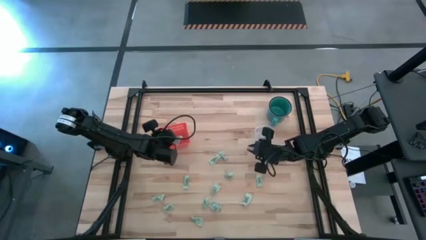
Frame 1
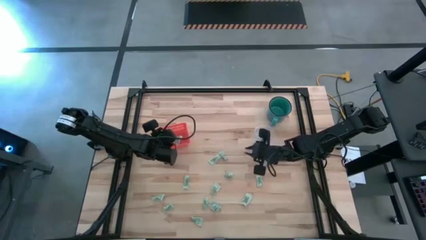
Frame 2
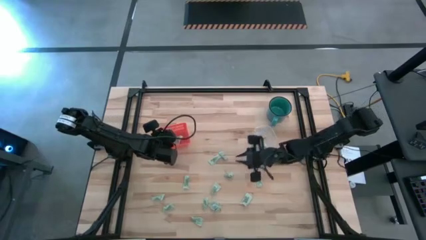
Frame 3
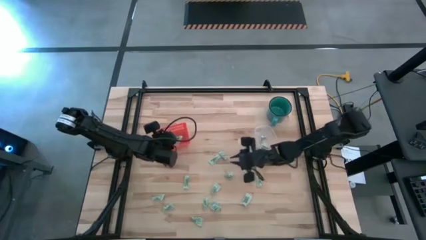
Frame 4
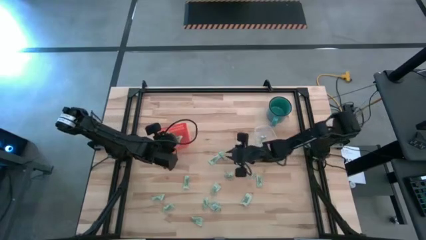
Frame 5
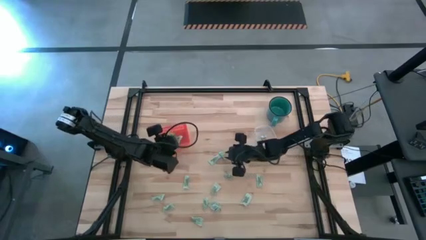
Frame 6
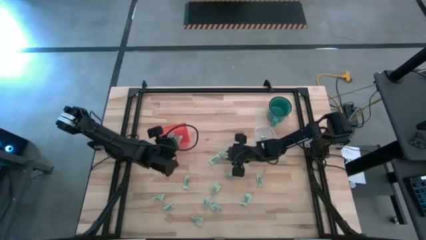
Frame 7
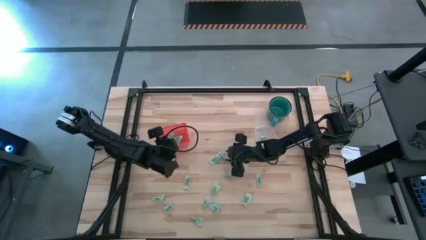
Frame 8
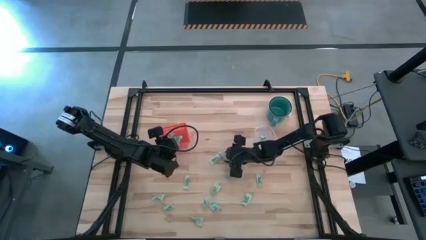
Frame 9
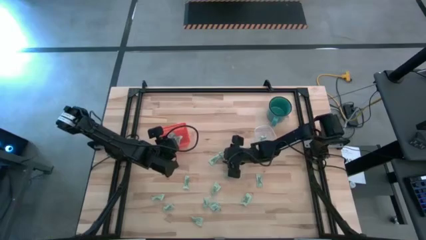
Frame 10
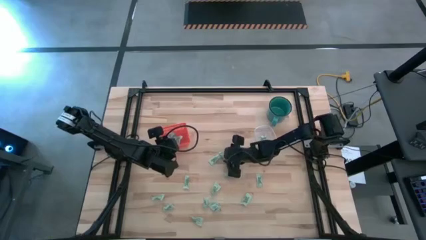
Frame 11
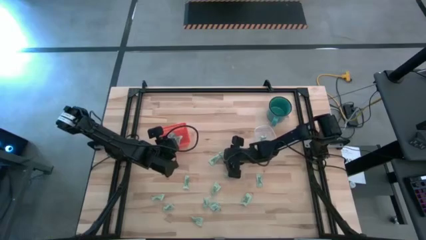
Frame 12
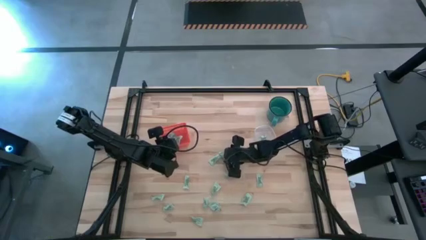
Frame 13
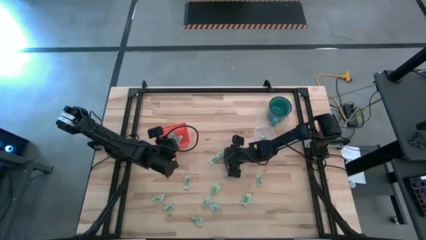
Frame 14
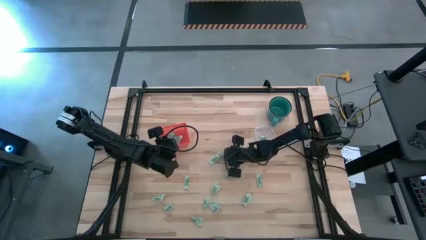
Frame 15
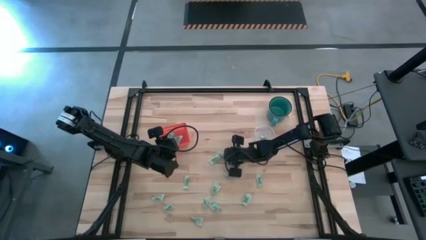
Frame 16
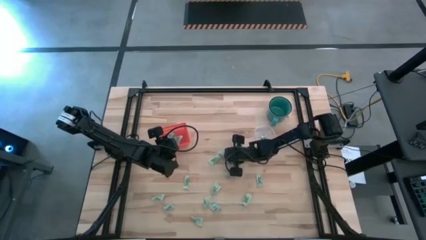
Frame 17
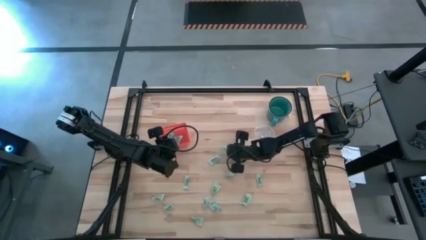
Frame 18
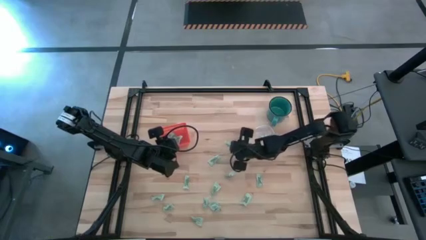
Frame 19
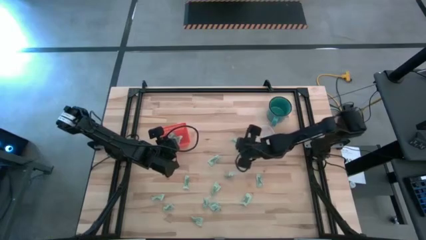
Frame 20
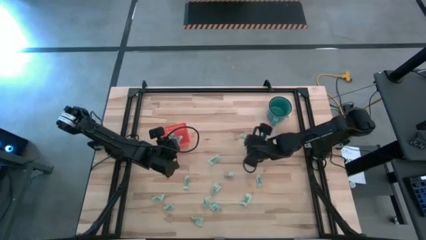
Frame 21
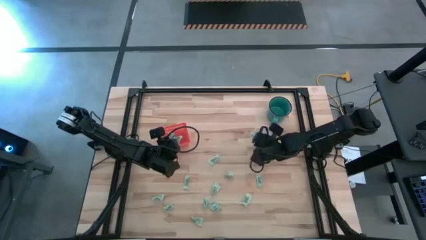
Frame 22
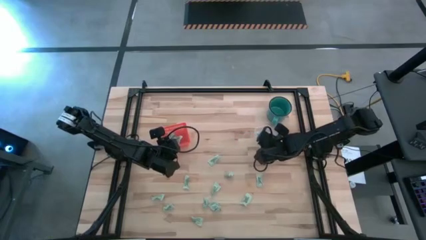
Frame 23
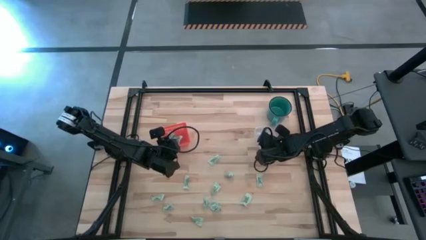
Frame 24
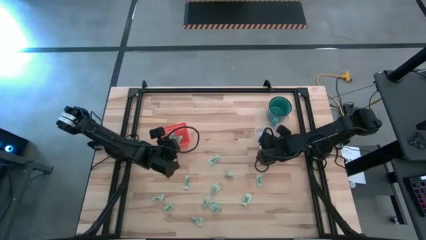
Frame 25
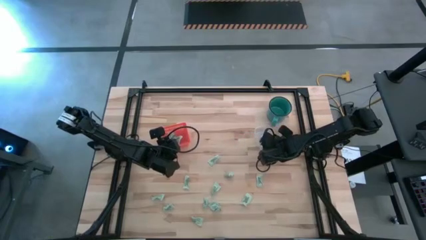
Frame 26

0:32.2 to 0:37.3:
Task: Pick and place items into bin
Put the stevia packet into the transparent container

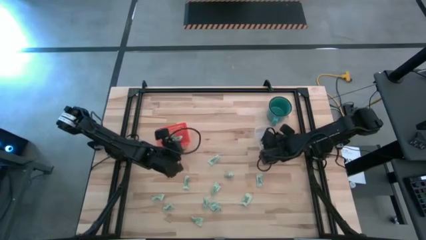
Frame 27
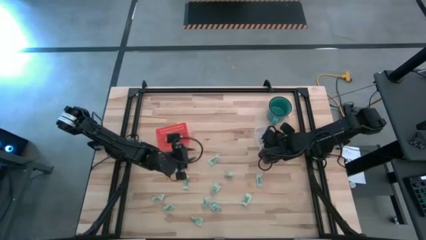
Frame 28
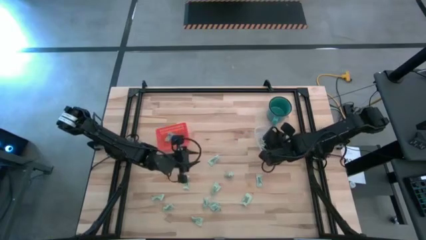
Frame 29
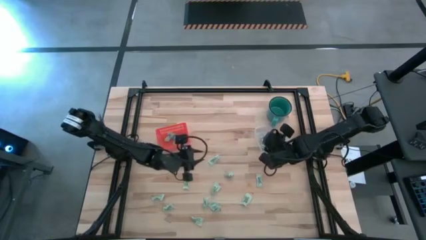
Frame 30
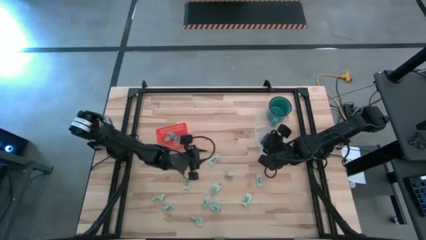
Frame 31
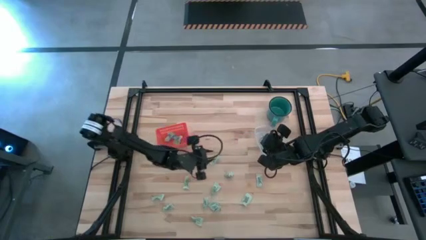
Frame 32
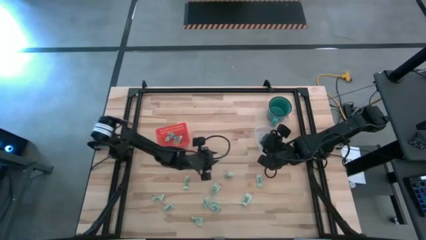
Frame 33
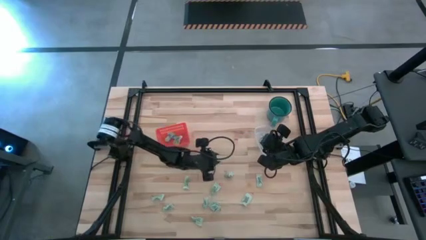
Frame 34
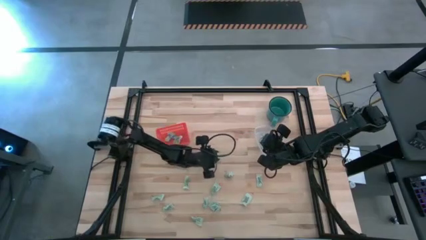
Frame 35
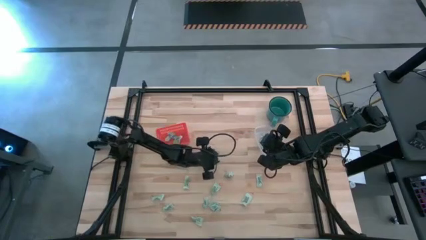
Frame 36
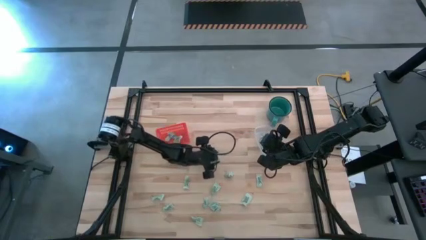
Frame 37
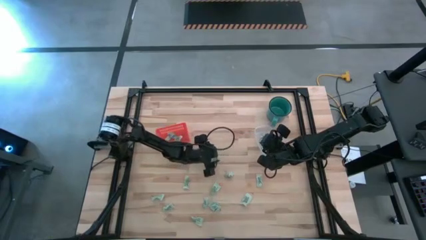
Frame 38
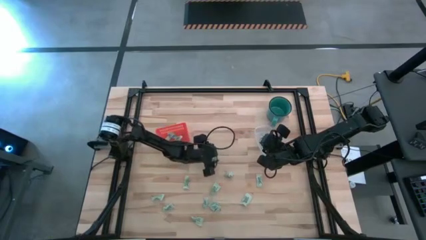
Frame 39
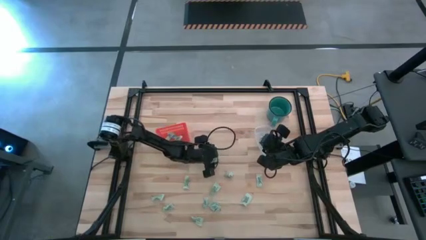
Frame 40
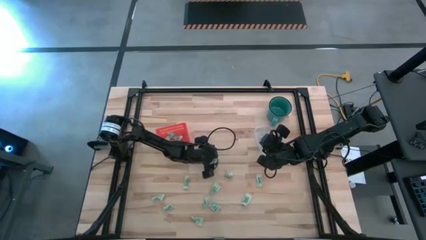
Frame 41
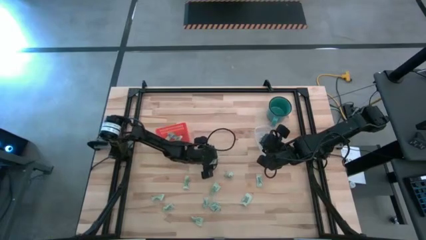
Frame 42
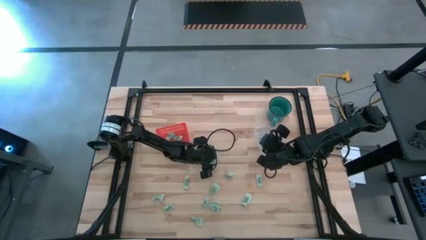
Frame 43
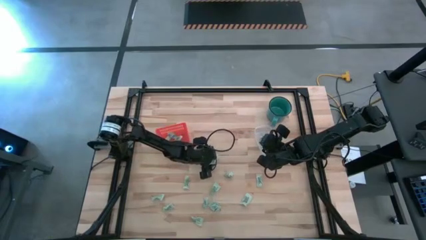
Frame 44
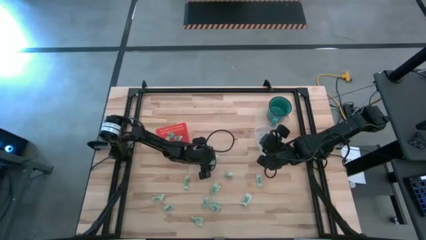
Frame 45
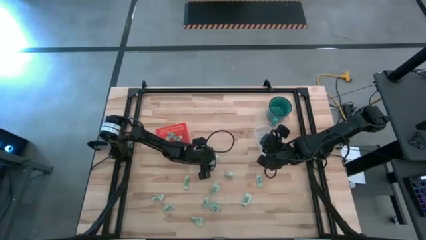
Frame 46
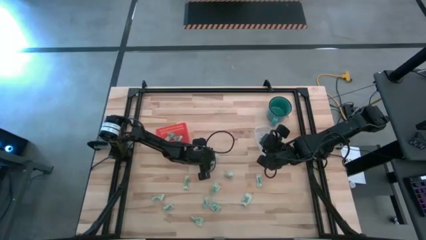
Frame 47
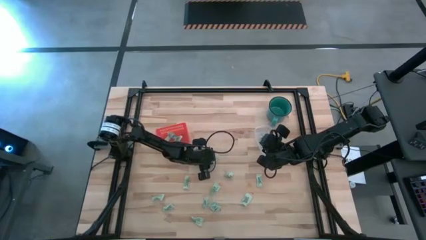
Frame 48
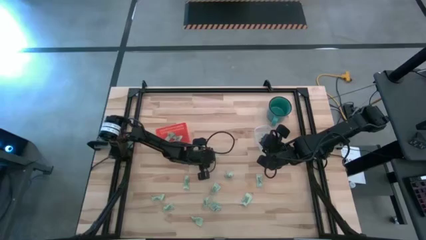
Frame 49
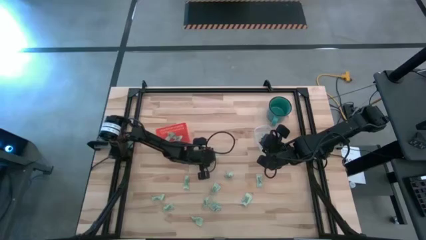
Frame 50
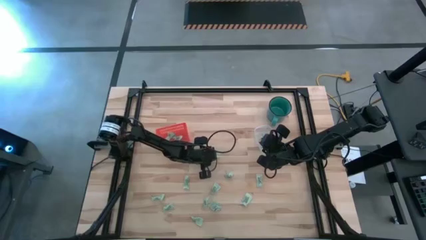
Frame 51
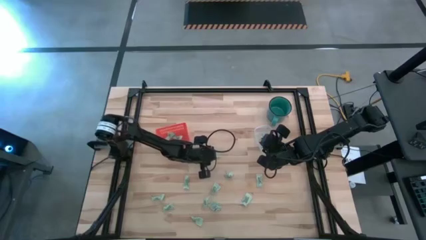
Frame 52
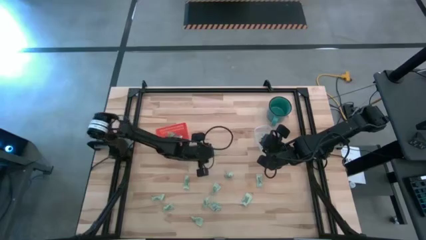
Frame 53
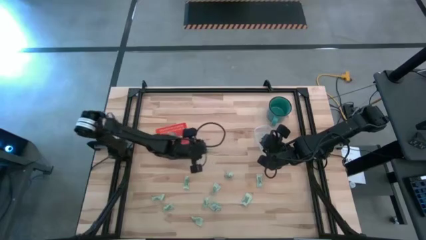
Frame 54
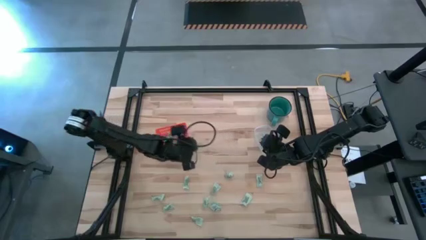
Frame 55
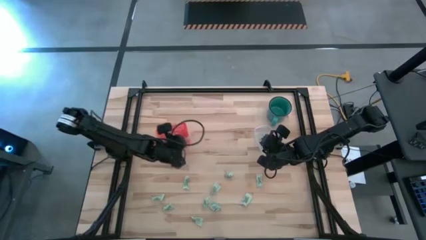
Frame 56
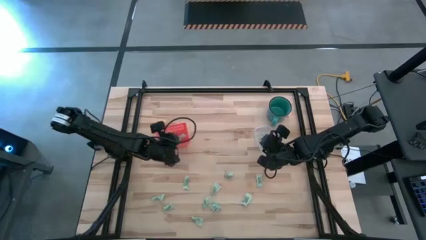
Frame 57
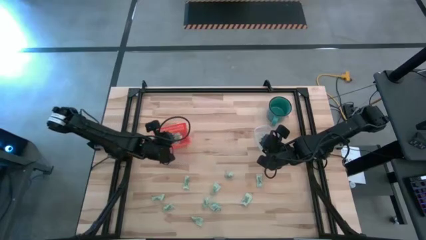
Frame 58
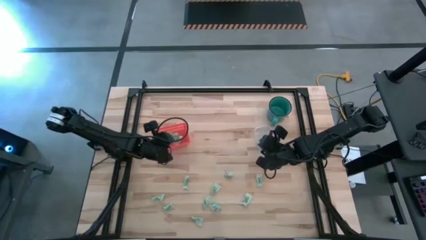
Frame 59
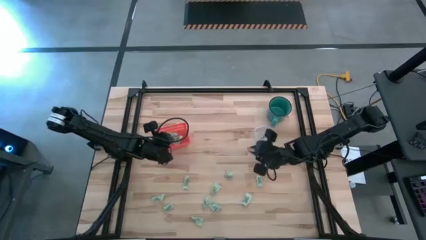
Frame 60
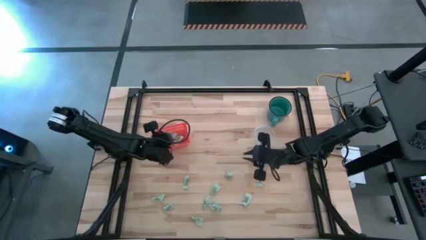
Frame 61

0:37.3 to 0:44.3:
Put the stevia packet into the orange bin

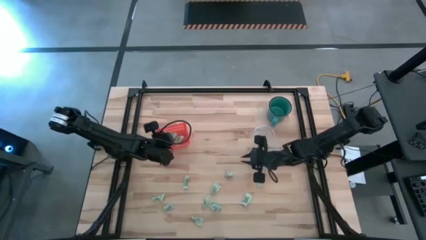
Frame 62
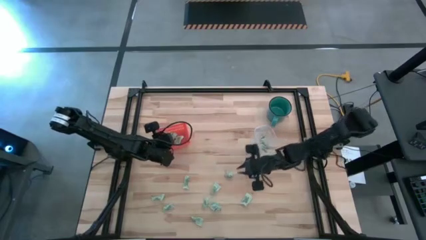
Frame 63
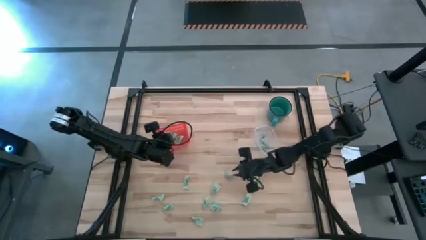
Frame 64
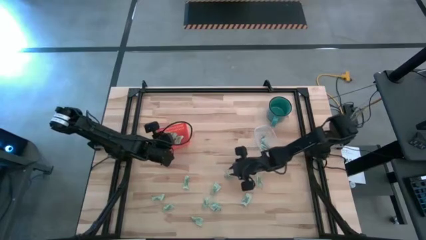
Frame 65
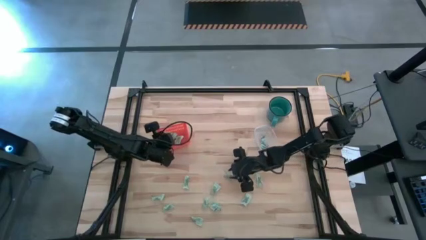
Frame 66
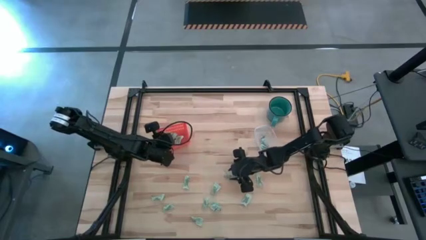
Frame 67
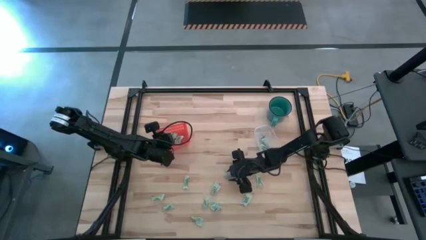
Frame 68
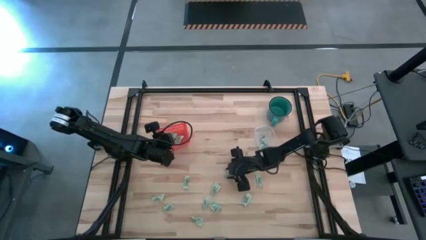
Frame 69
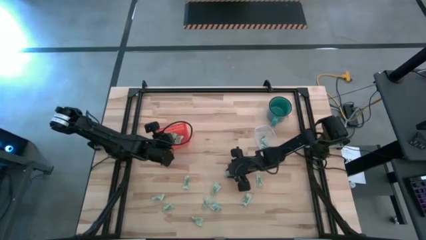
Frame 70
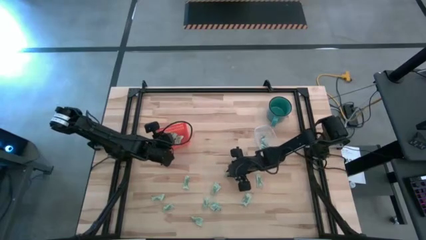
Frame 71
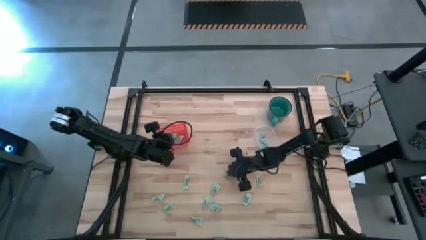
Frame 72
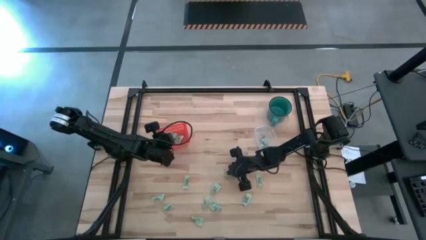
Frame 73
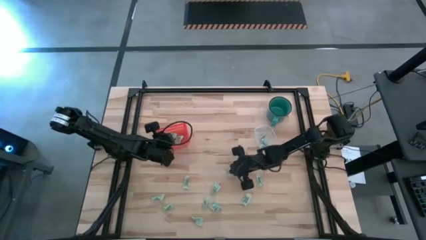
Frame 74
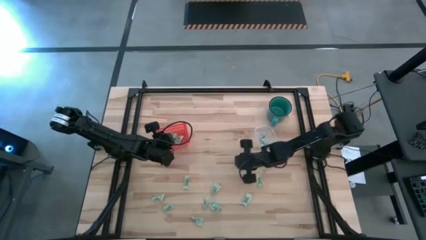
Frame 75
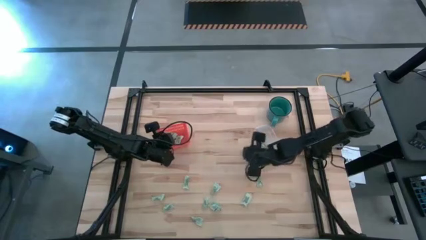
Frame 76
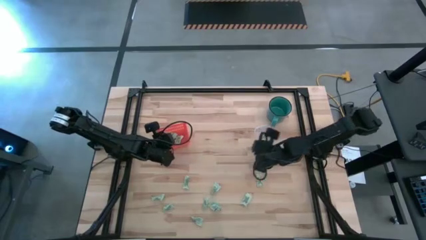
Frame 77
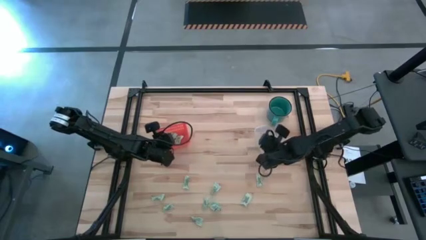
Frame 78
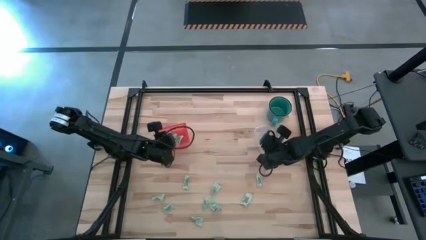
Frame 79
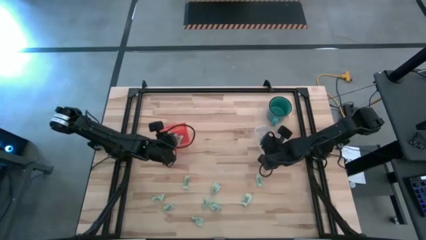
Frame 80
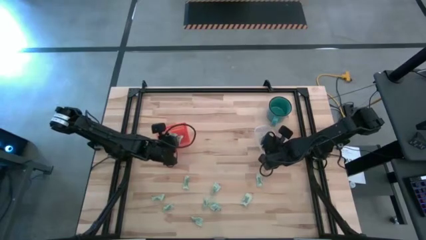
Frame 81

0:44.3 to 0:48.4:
Put the stevia packet into the transparent container
